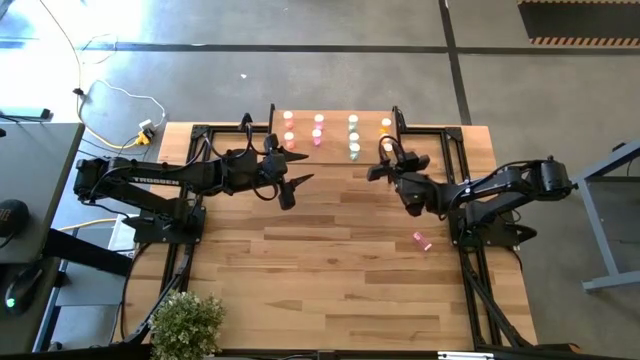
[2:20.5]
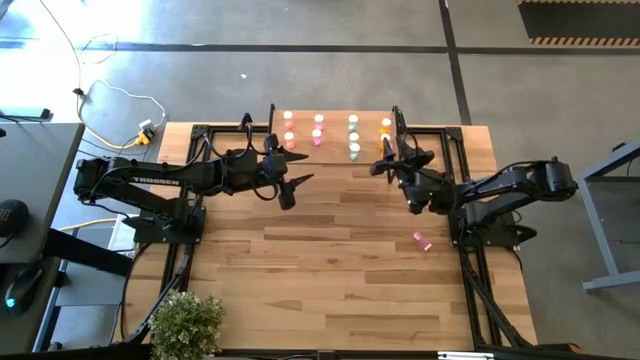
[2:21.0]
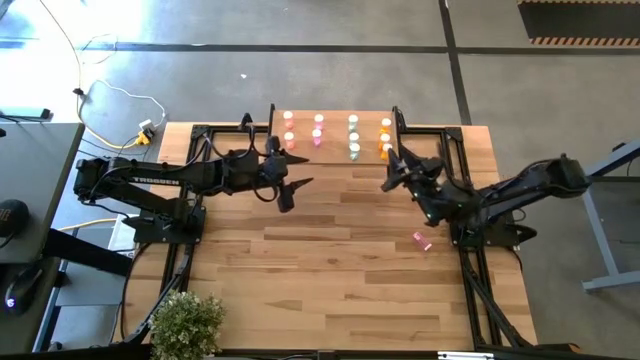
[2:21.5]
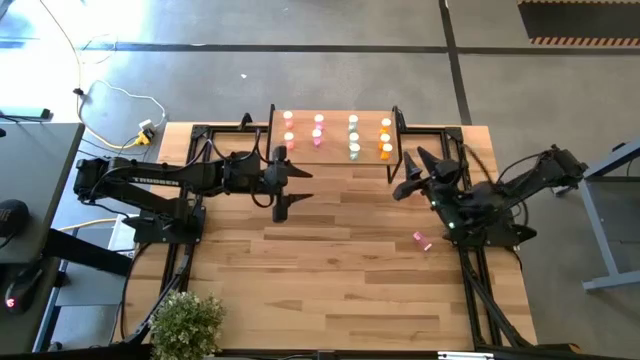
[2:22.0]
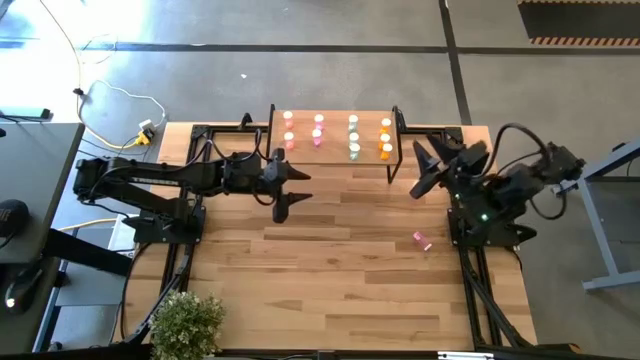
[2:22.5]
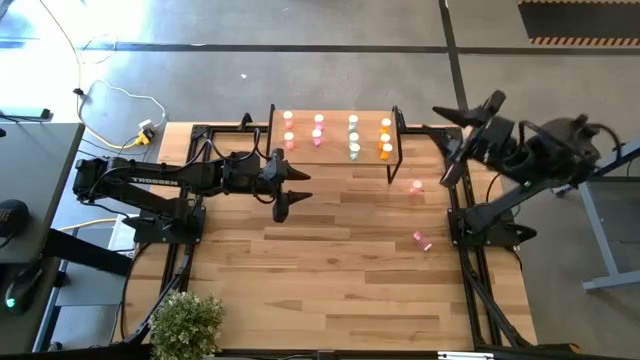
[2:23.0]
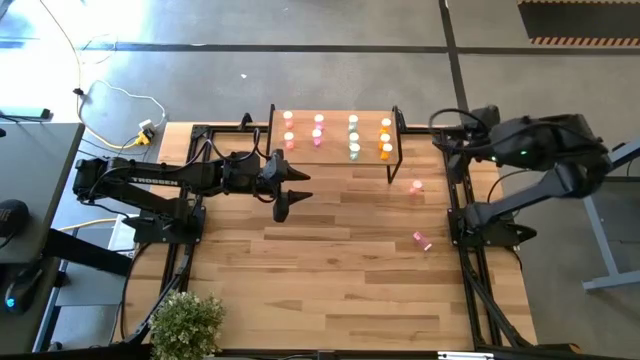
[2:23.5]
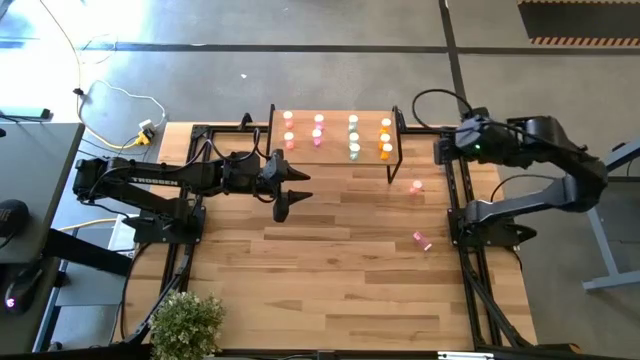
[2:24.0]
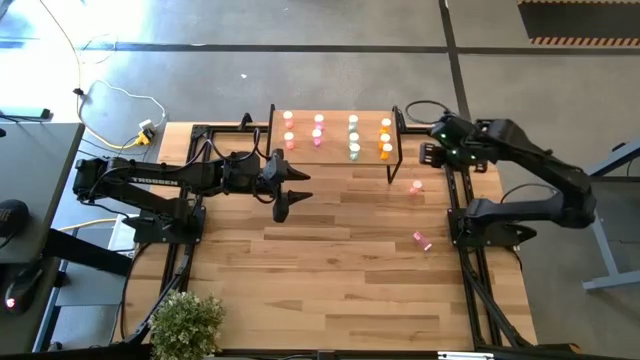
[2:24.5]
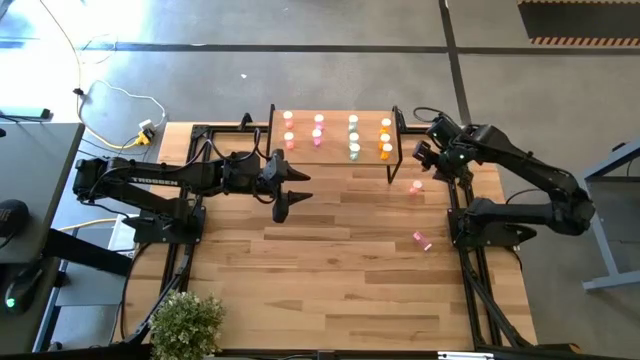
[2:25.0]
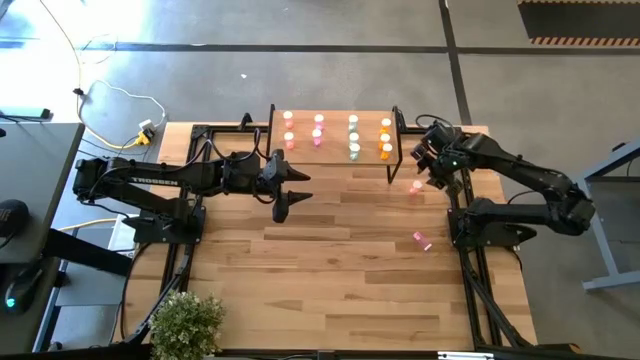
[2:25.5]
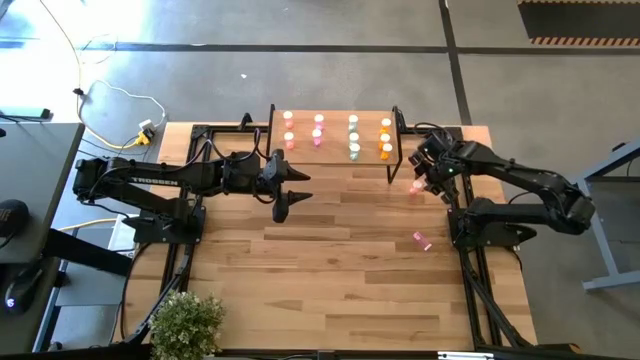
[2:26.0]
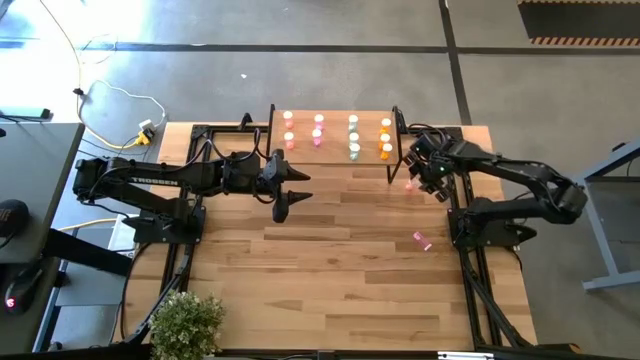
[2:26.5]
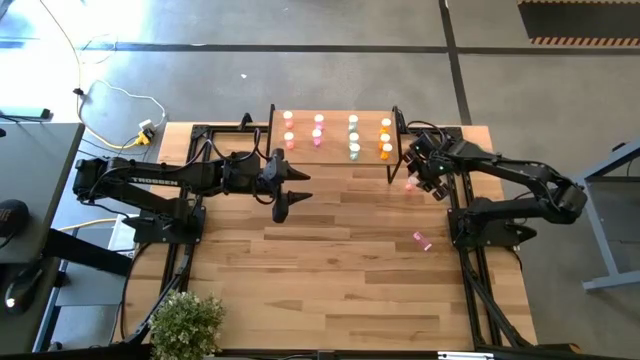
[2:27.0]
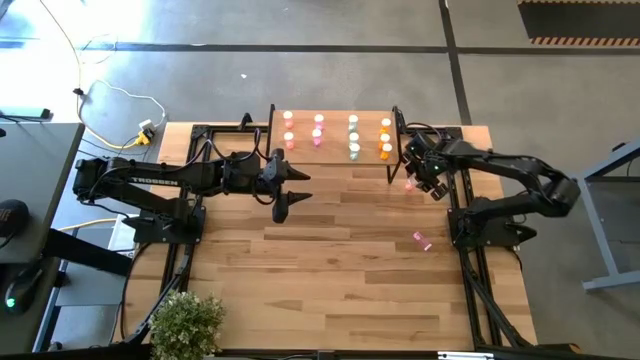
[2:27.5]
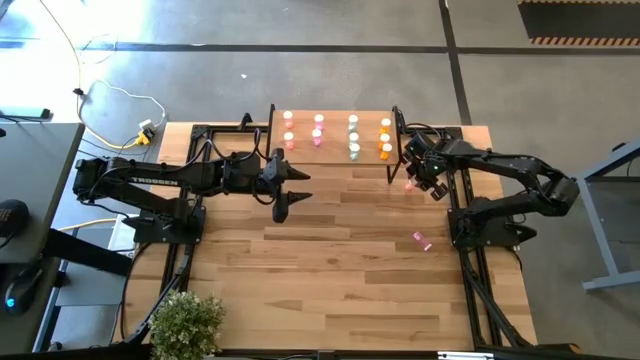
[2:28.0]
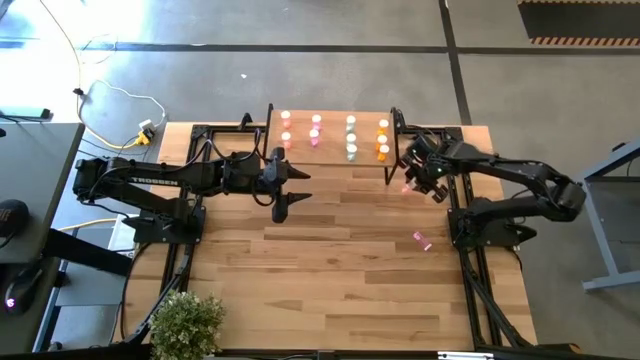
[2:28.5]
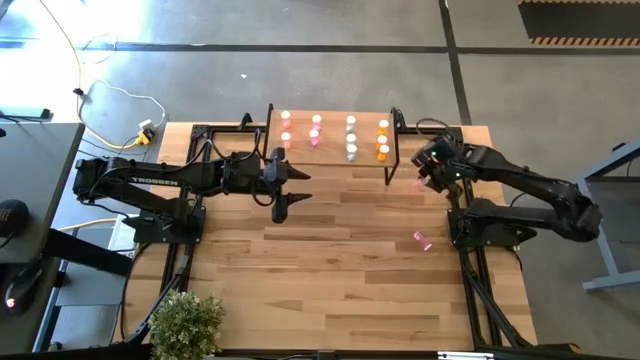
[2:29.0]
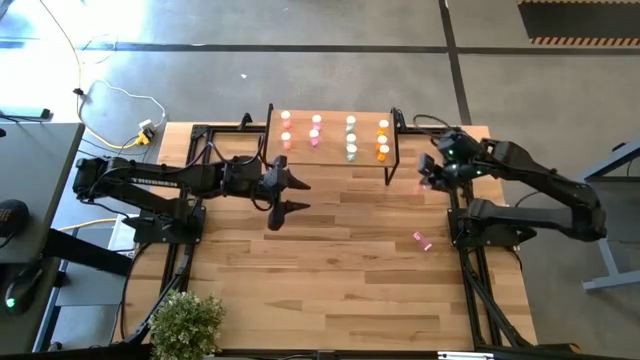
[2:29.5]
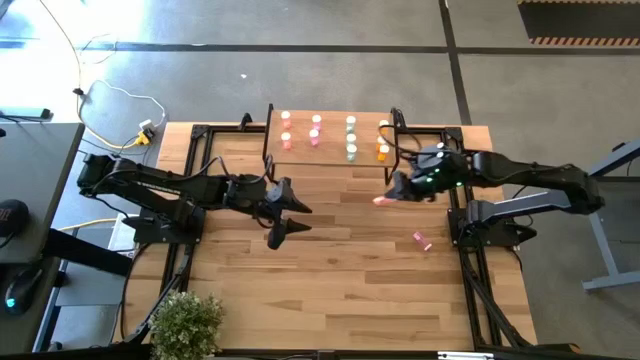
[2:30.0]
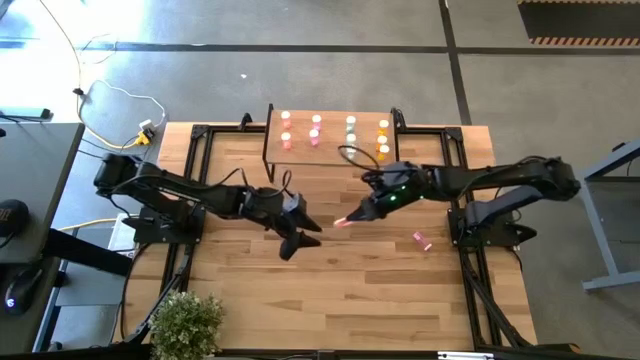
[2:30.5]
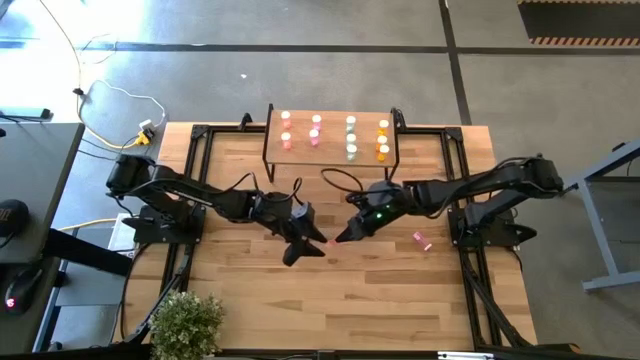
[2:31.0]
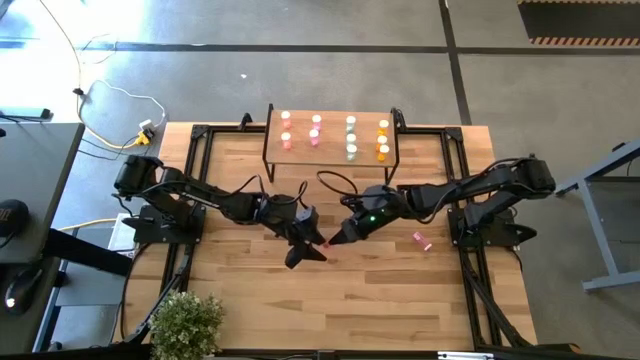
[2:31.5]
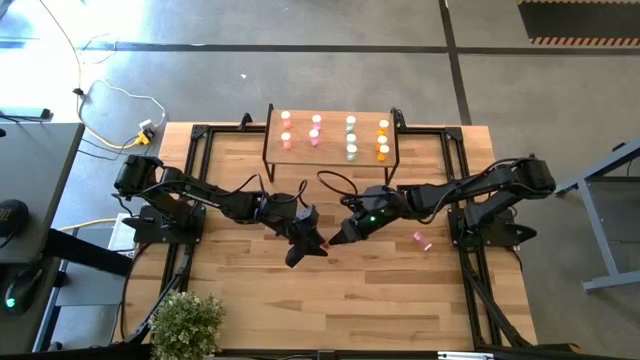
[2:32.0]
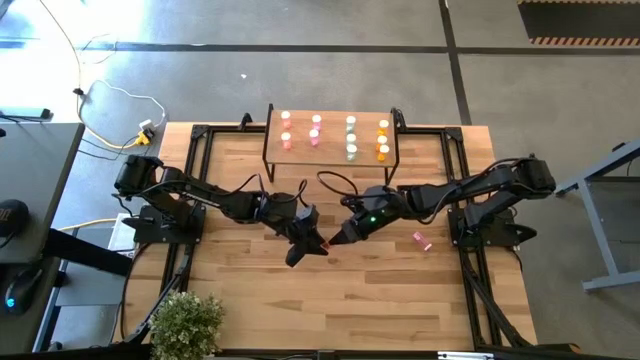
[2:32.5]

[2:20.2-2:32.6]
Task: Pick and place medicine bottles onto shelf by color
Put the pink pill bottle aligned with the other pink pill bottles on the shelf

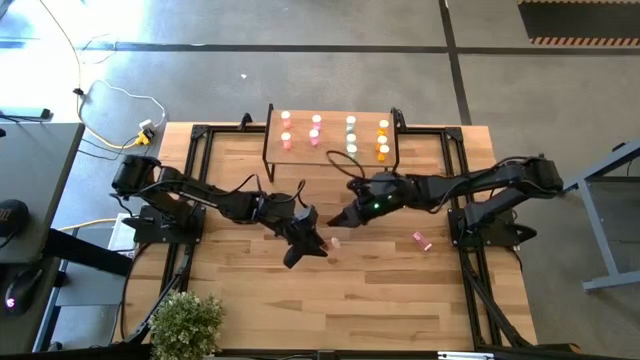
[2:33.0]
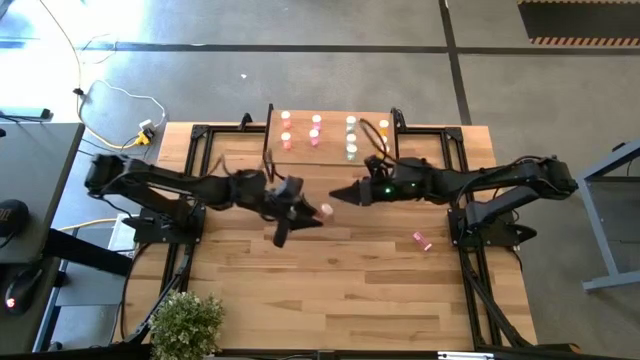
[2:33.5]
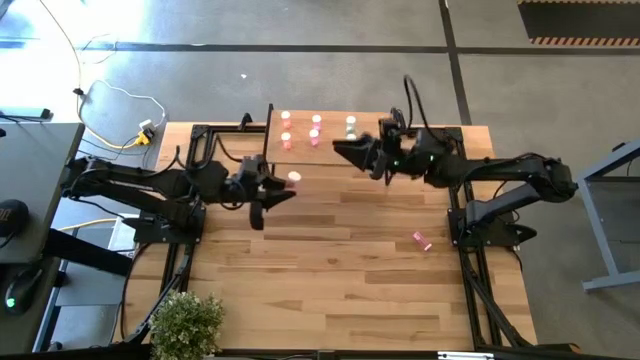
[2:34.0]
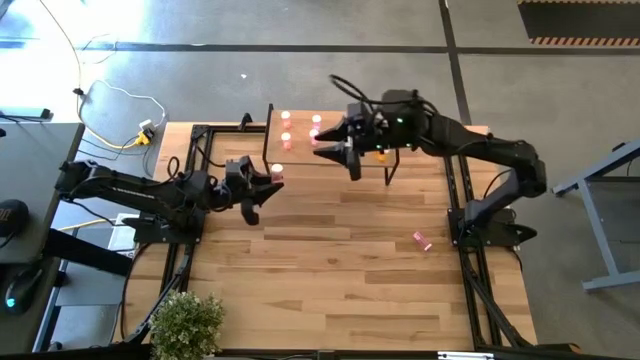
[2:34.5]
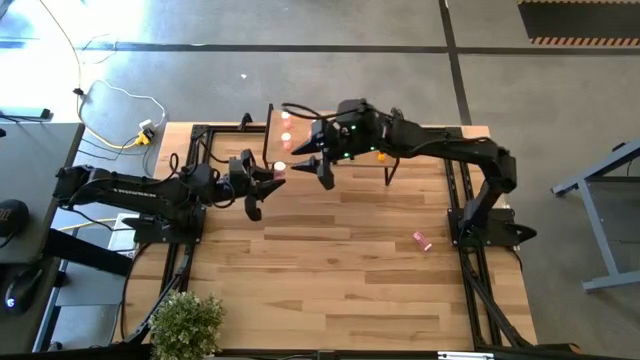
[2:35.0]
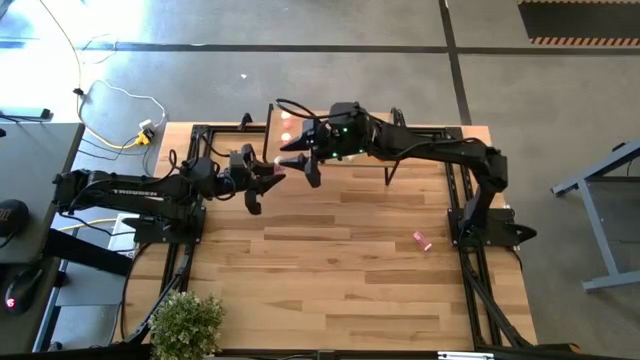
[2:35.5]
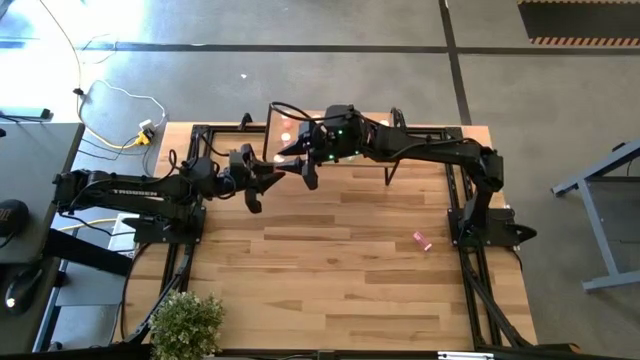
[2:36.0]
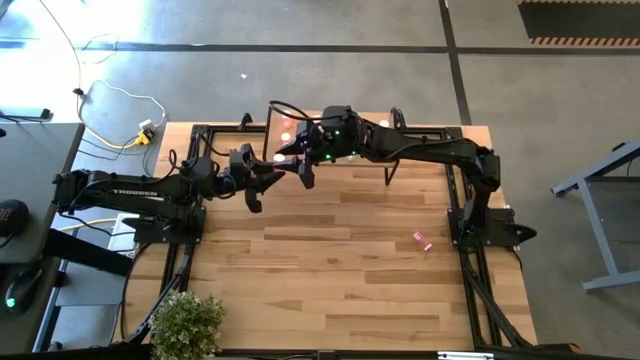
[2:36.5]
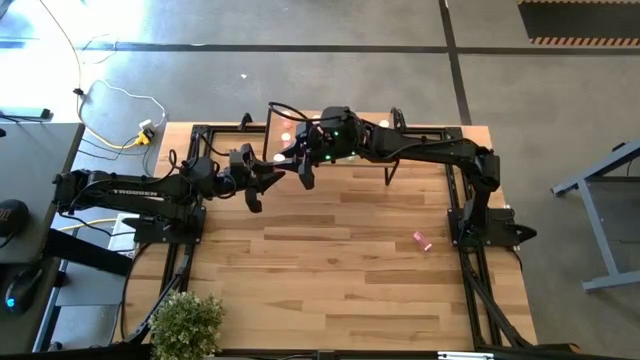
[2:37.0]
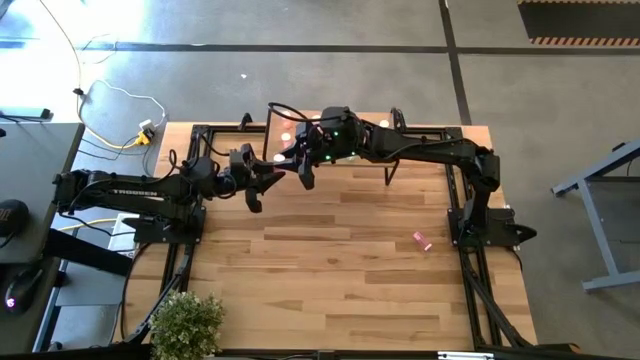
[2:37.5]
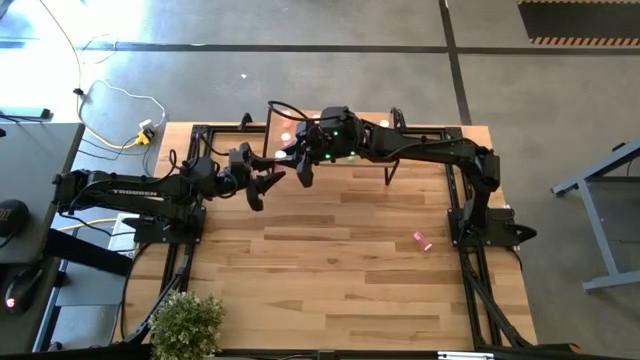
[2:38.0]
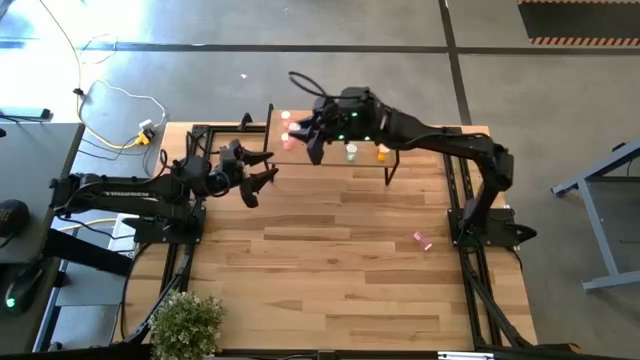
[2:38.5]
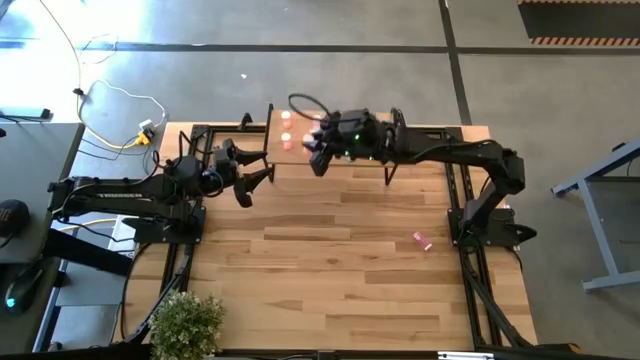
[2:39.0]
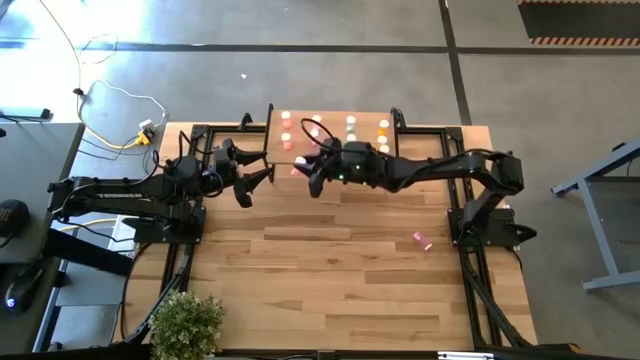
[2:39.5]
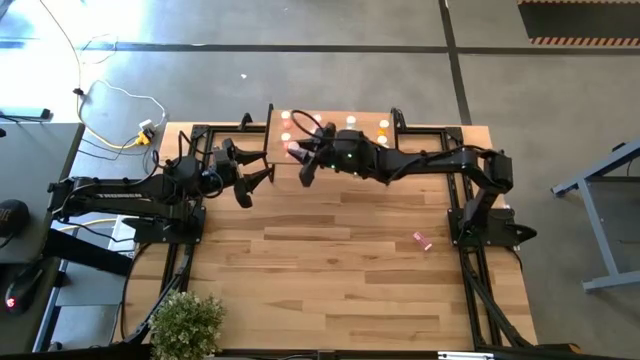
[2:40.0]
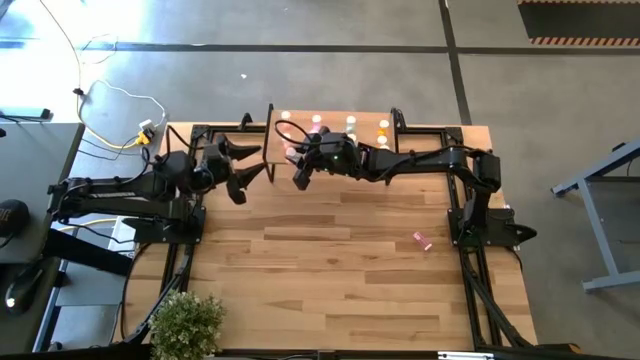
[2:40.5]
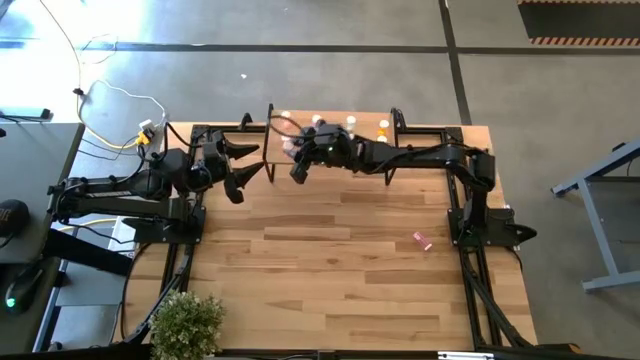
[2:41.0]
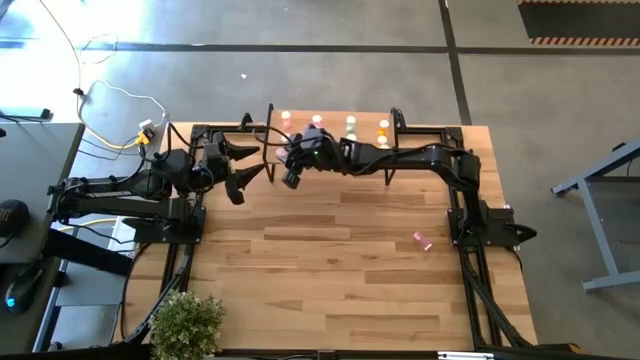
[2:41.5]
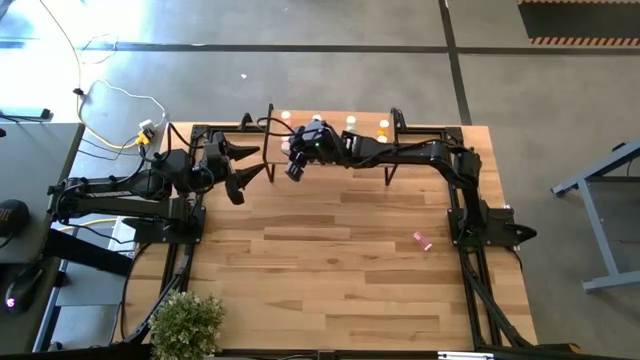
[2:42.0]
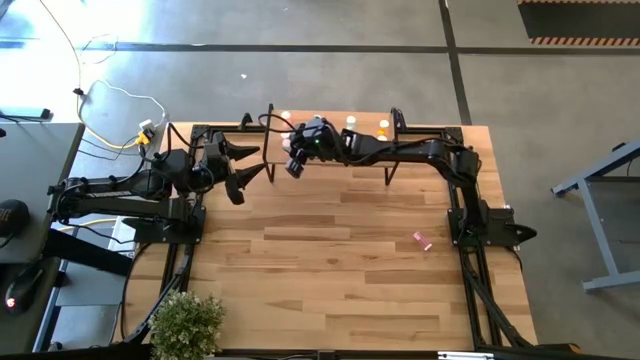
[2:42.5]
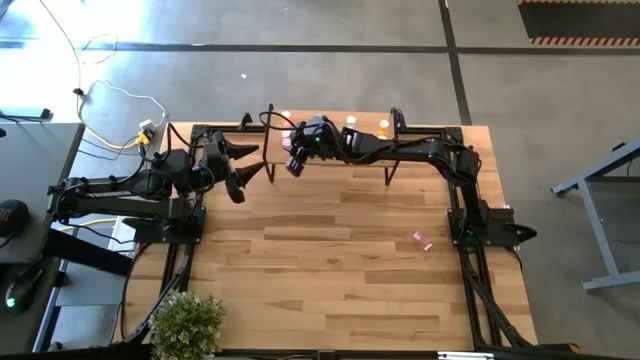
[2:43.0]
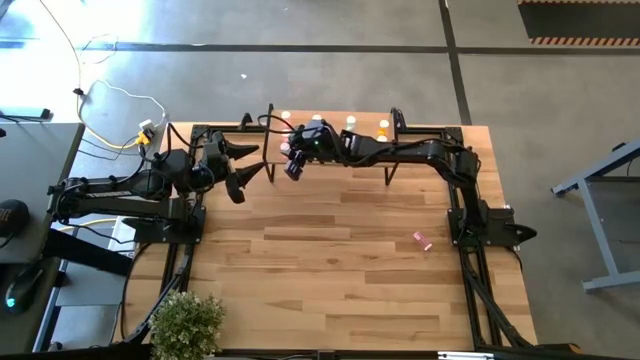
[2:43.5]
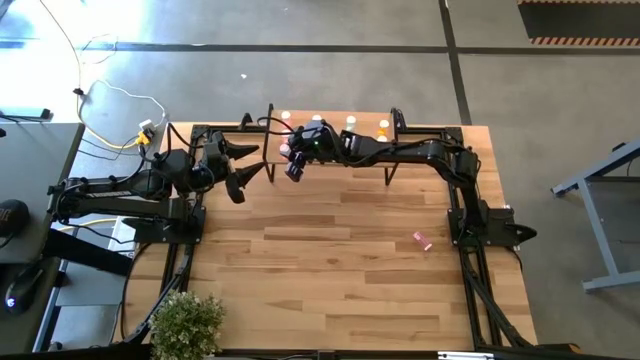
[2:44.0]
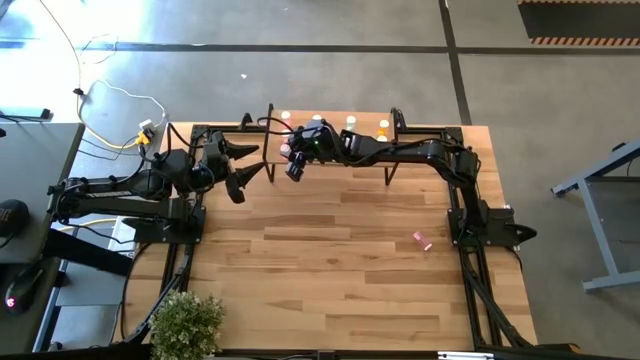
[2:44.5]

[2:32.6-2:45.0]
Put the pink pill bottle aligned with the other pink pill bottles on the shelf
